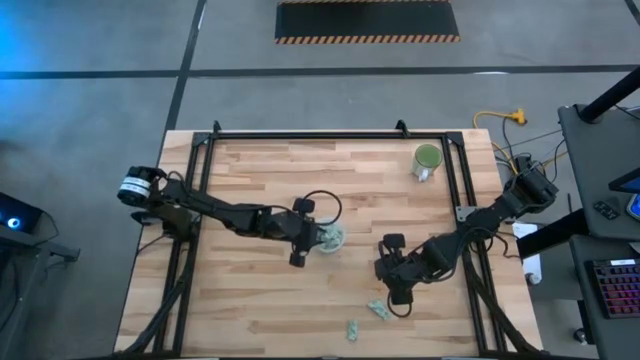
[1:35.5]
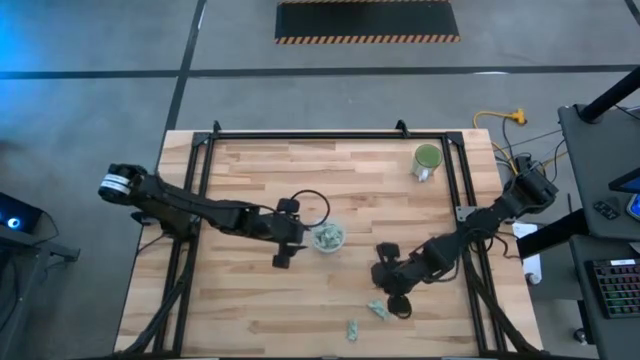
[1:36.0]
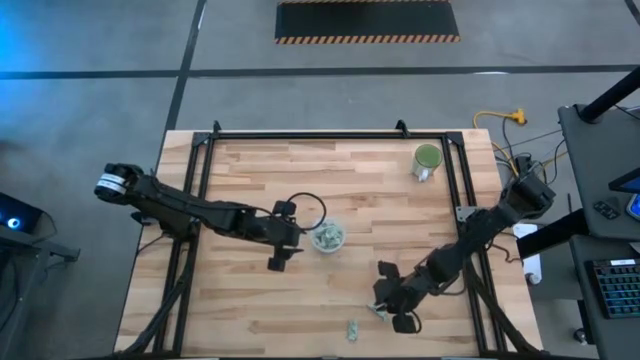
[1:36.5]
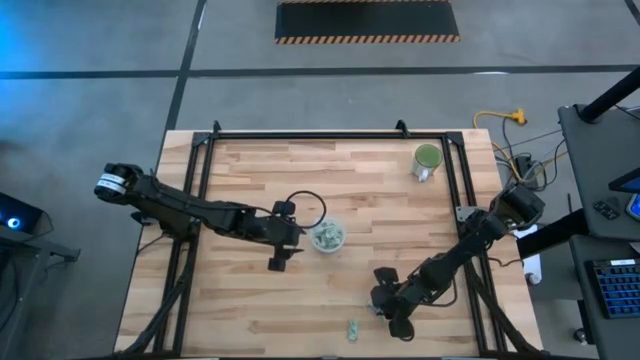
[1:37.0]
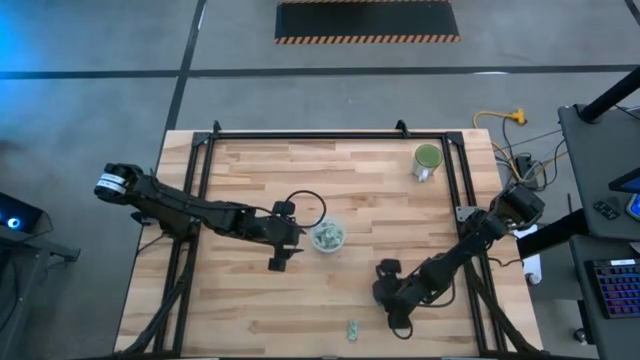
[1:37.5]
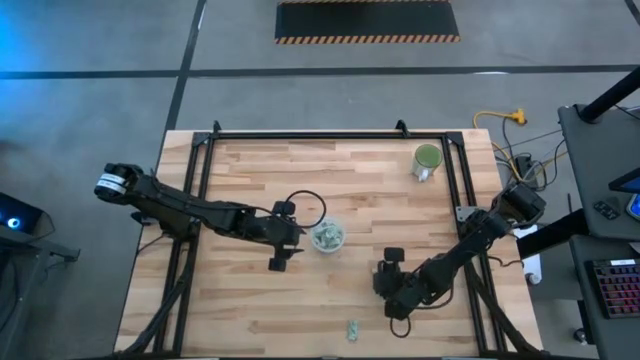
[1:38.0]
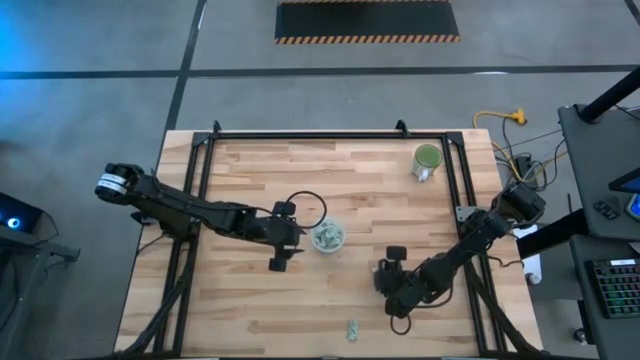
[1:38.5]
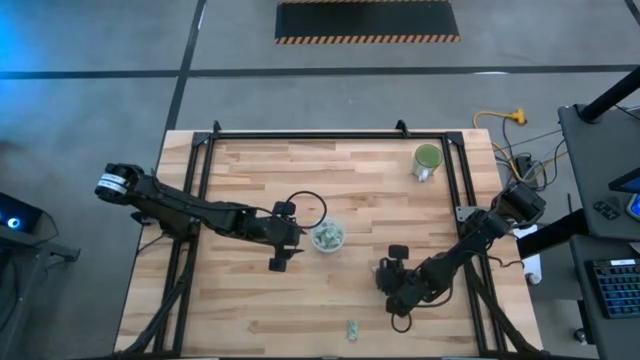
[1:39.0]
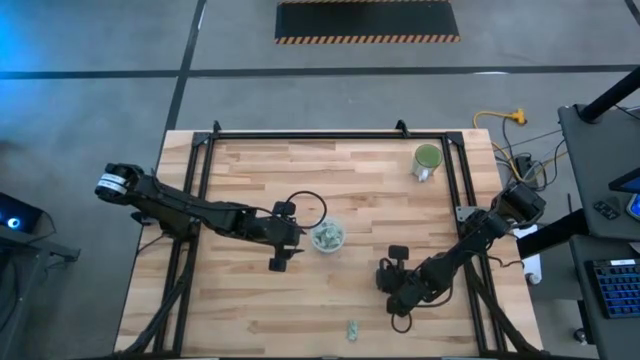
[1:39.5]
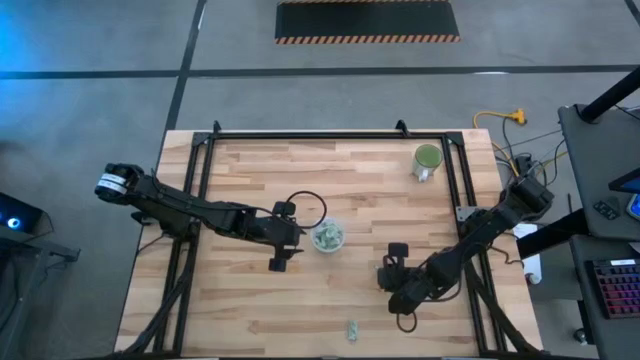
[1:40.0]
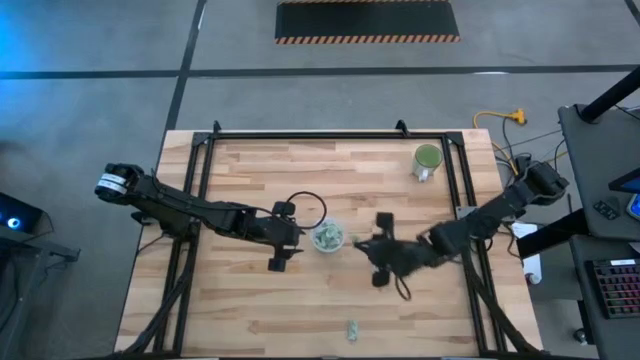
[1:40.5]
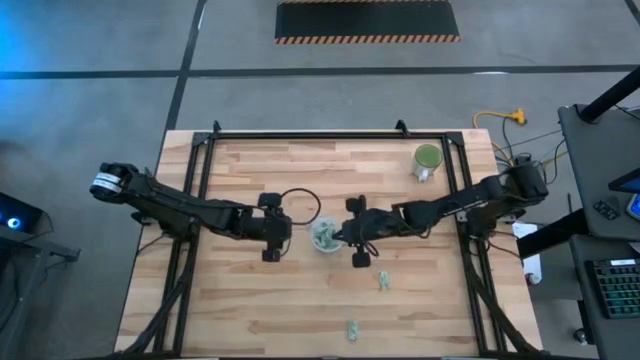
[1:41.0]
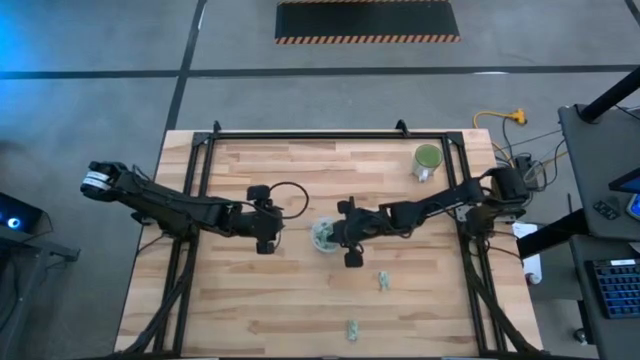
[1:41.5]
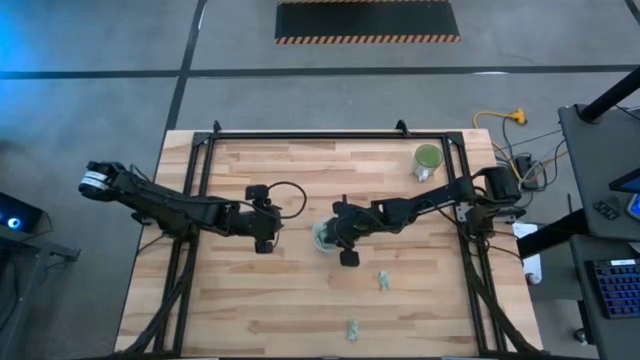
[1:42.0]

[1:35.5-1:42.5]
Task: Pick and place Stevia / Truvia into bins
Put the light green stevia packet into the transparent container

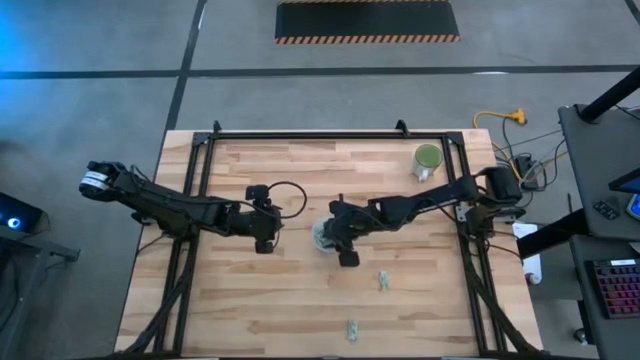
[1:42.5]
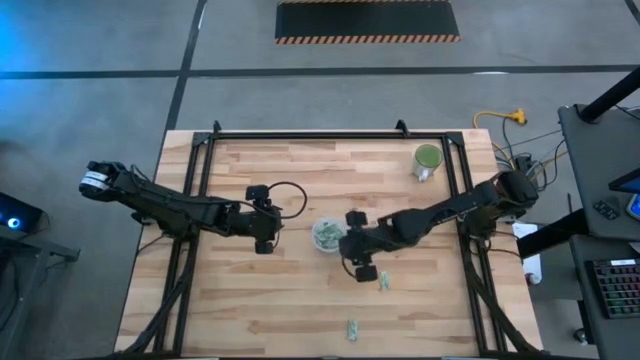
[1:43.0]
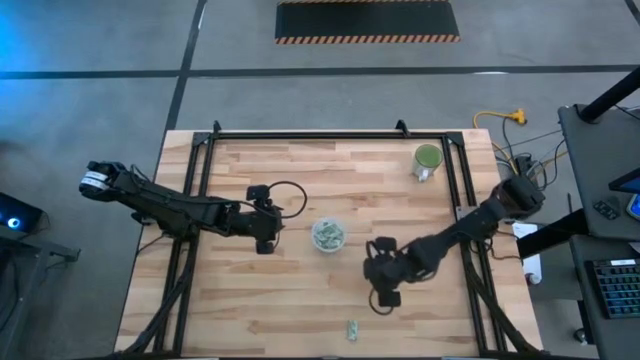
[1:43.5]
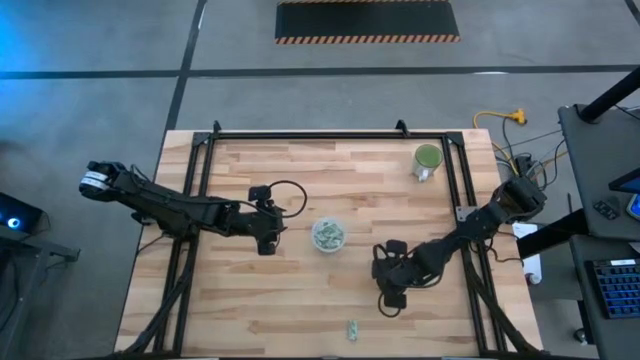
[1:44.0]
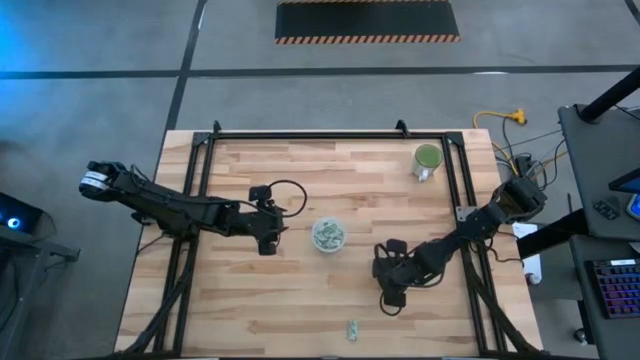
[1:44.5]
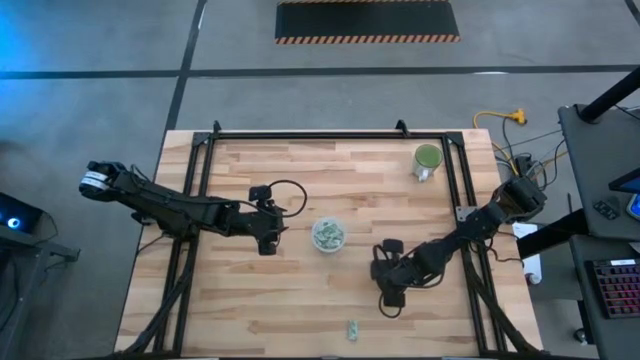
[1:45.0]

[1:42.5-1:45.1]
Put the light green stevia packet into the transparent container

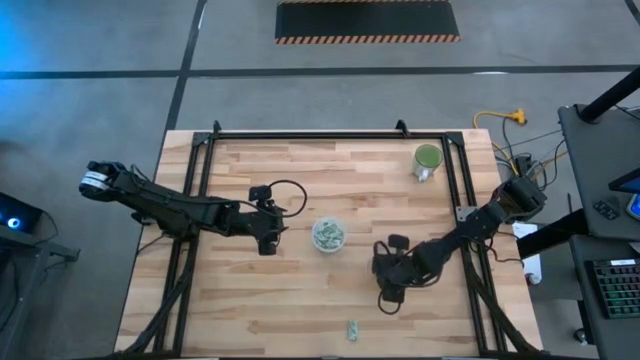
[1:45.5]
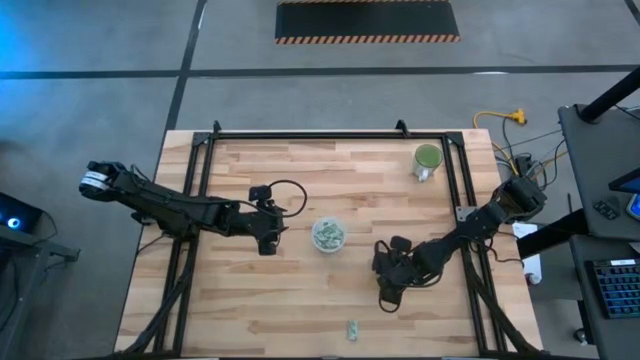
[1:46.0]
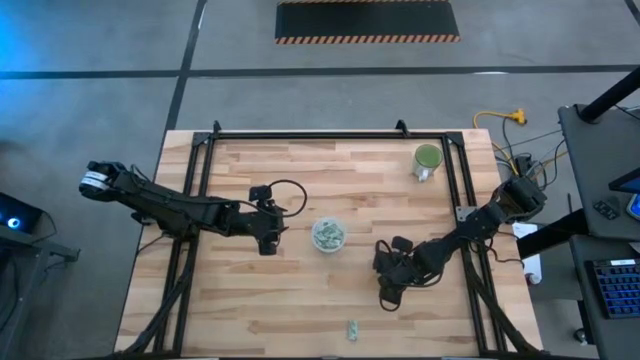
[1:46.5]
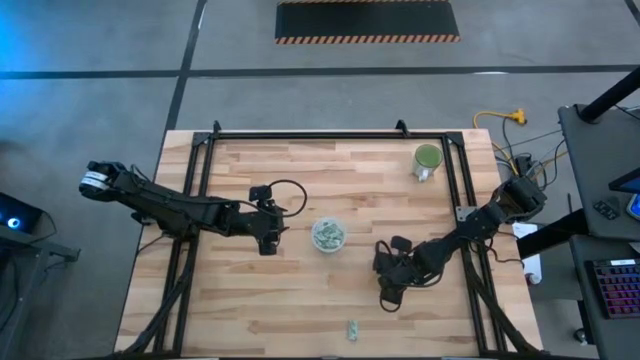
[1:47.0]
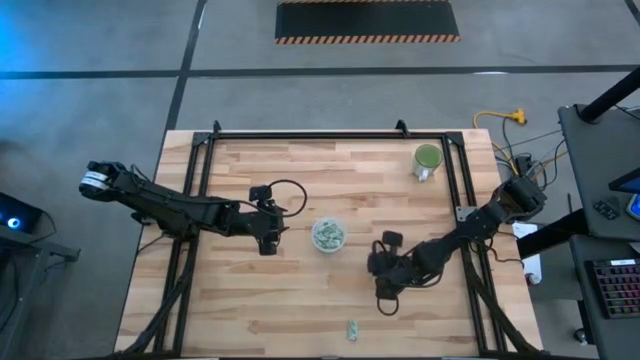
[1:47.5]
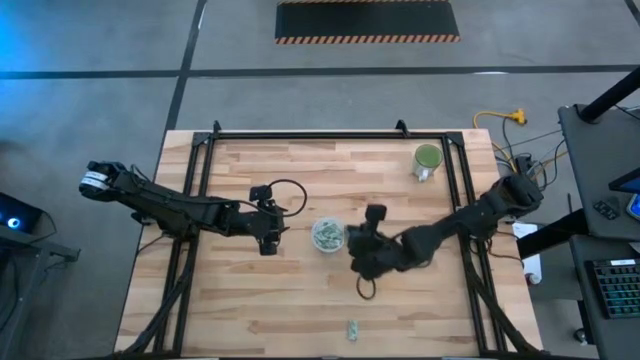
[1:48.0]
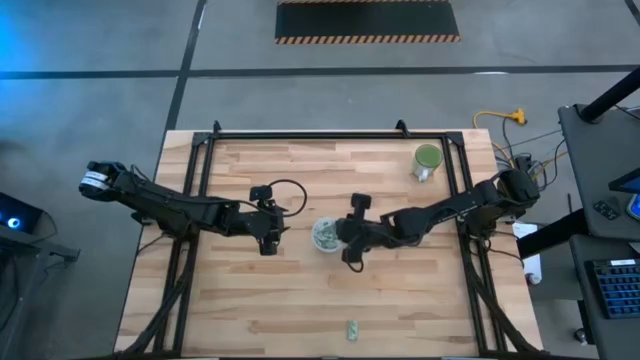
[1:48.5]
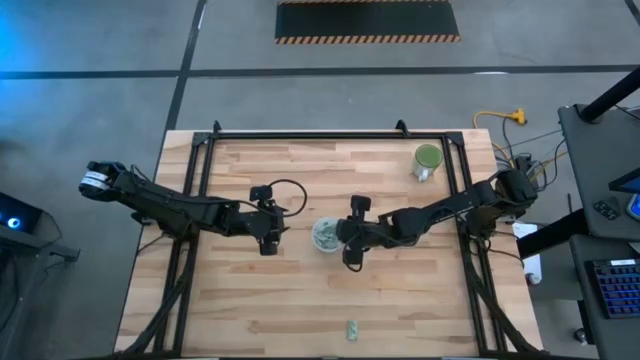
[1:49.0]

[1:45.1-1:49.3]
Put the light green stevia packet into the transparent container

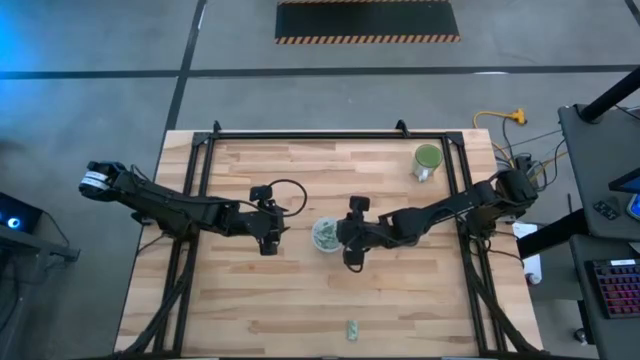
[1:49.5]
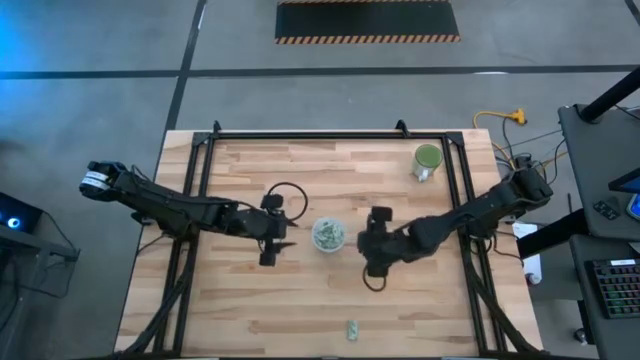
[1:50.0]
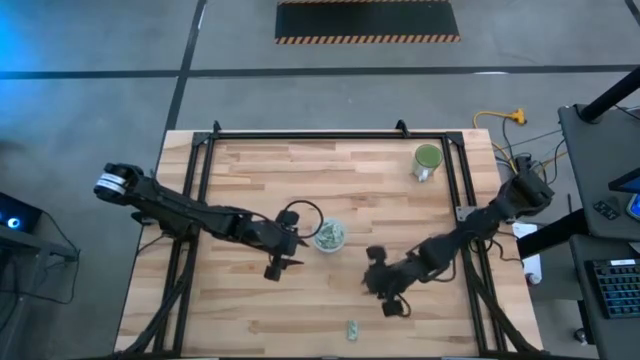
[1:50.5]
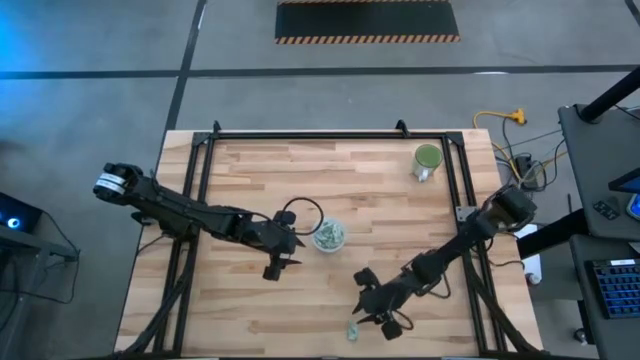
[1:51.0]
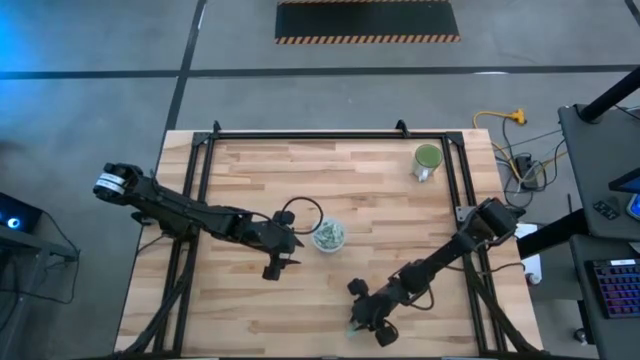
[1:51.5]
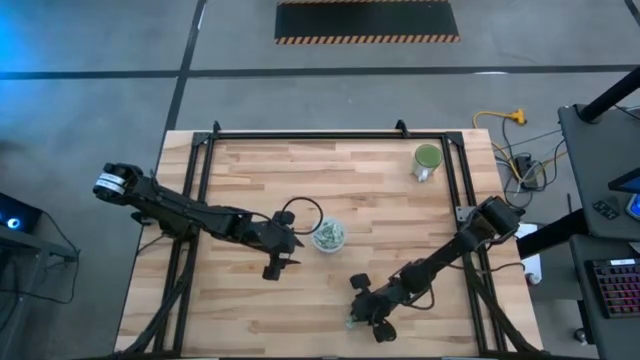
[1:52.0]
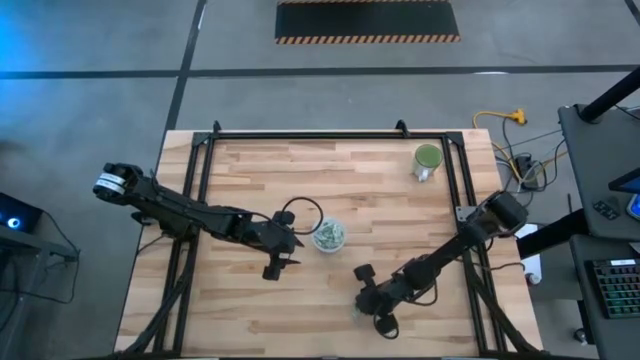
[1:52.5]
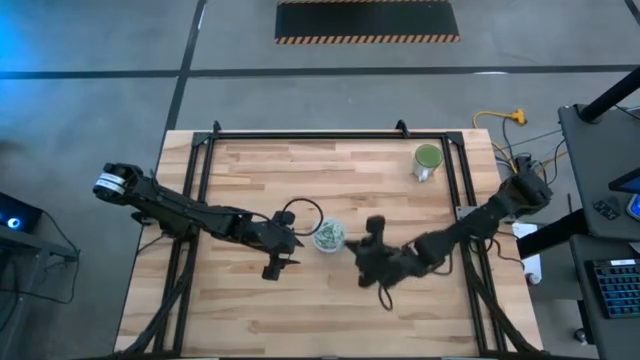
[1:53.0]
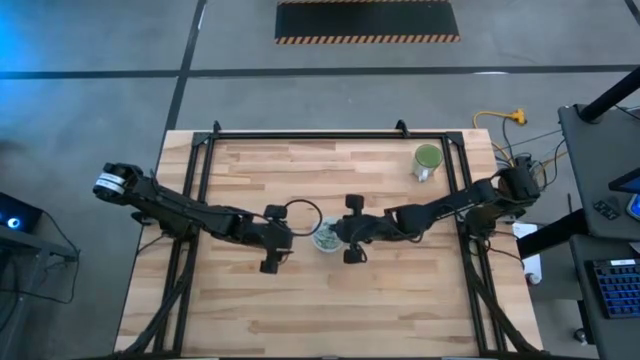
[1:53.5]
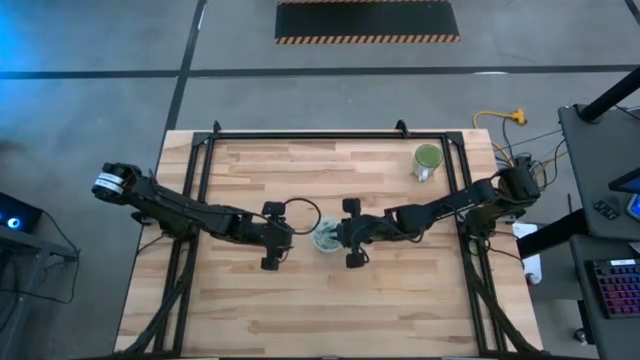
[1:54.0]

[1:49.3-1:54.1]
Put the light green stevia packet into the transparent container

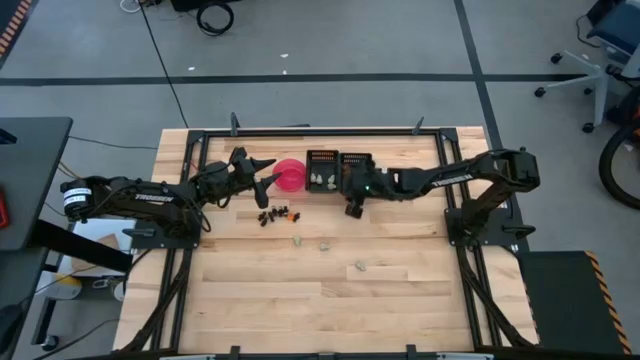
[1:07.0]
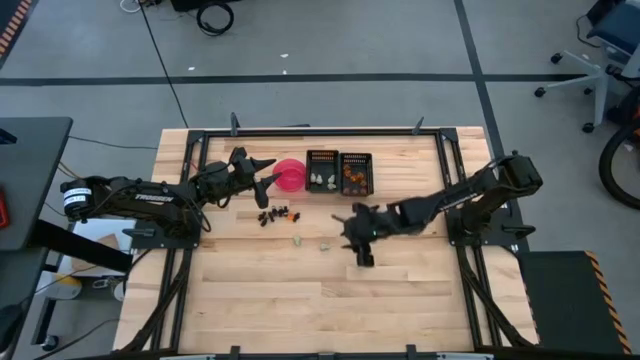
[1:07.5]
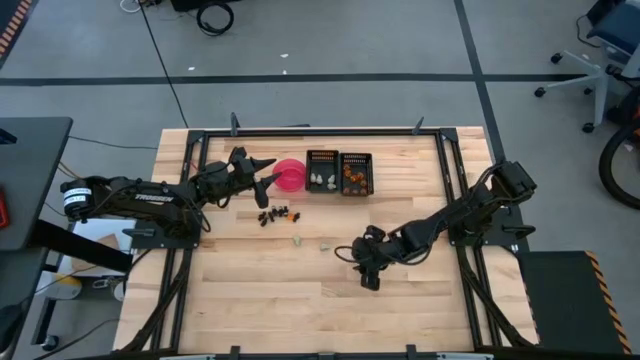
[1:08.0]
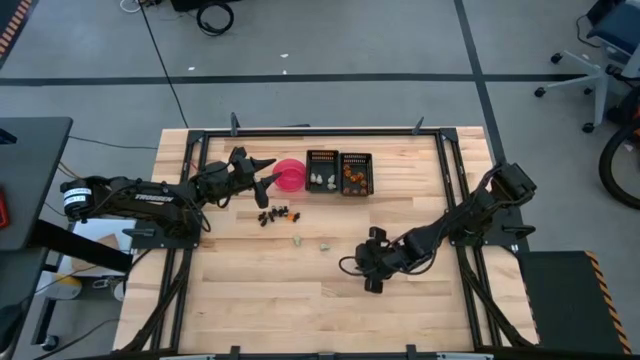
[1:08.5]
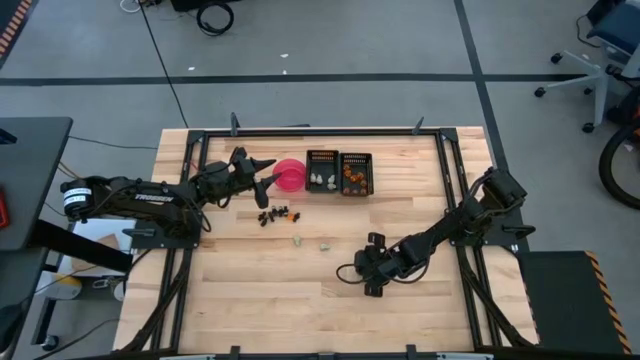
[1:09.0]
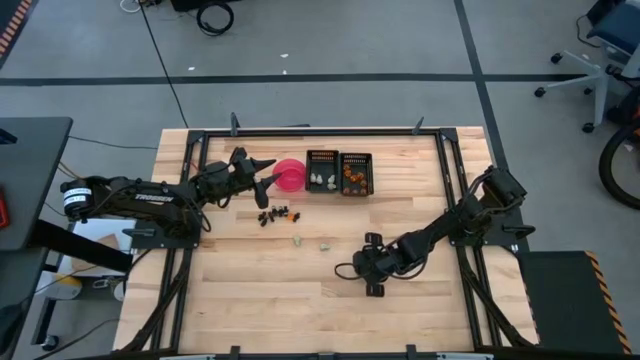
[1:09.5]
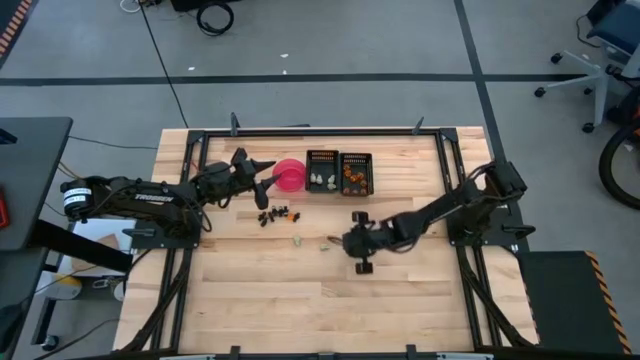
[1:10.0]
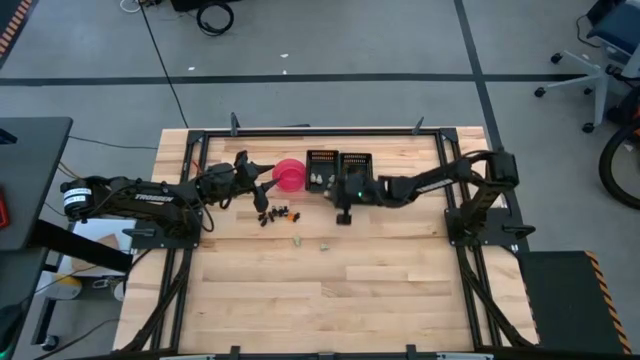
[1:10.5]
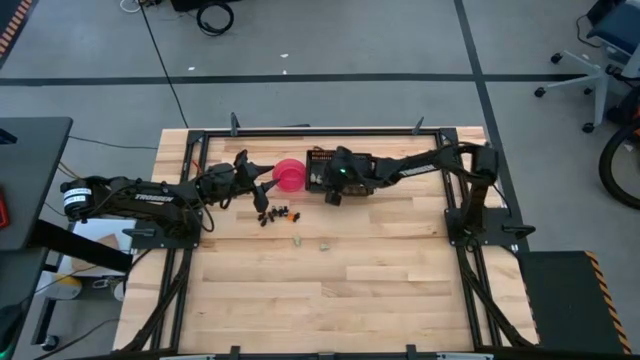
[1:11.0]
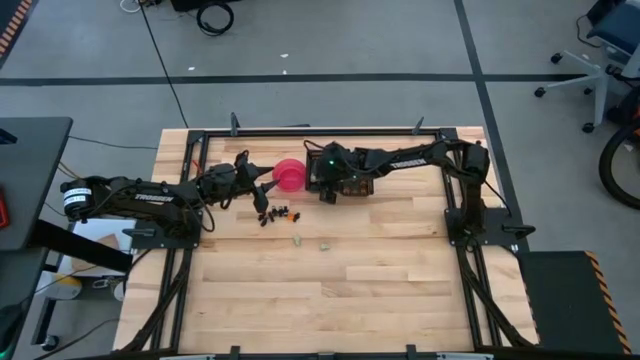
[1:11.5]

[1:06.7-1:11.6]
Task: Sort Halloween decoration
Put the white skull toy into the left black bin
